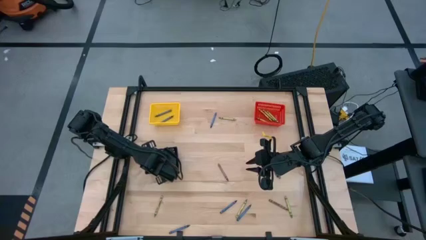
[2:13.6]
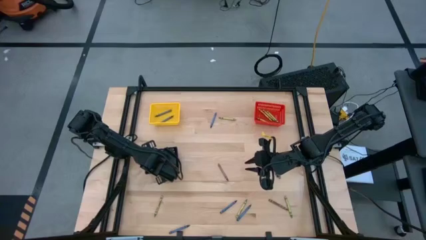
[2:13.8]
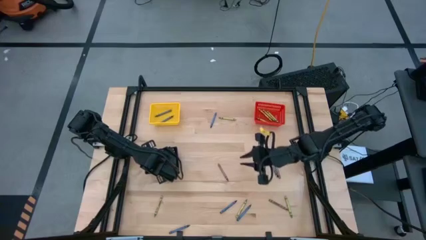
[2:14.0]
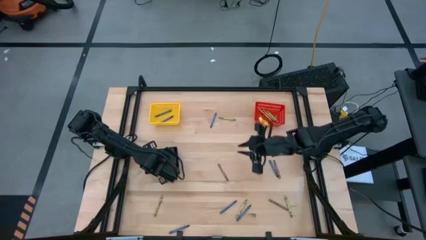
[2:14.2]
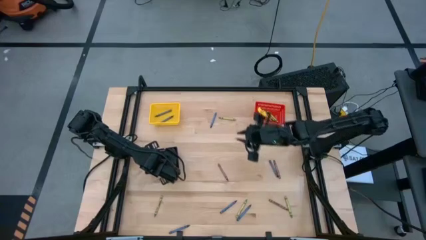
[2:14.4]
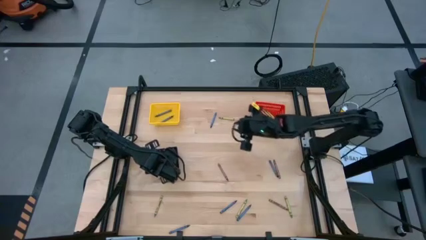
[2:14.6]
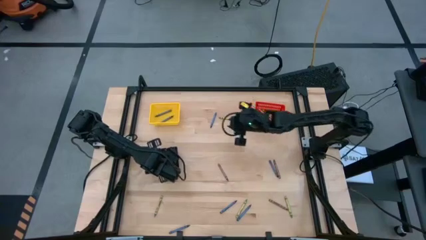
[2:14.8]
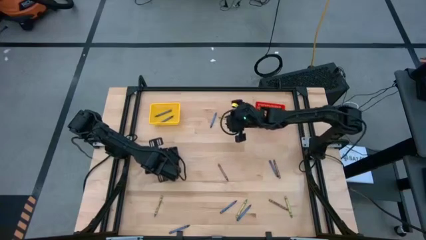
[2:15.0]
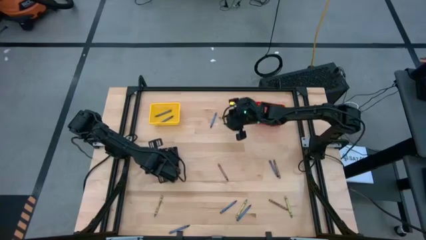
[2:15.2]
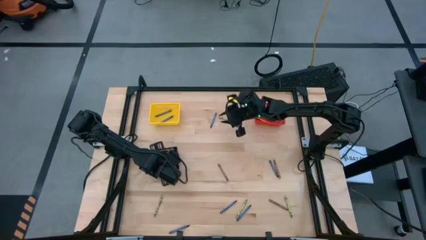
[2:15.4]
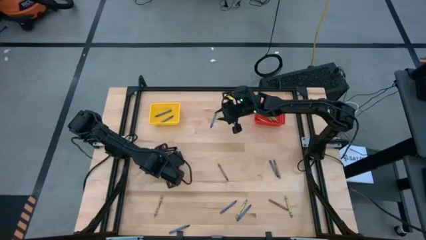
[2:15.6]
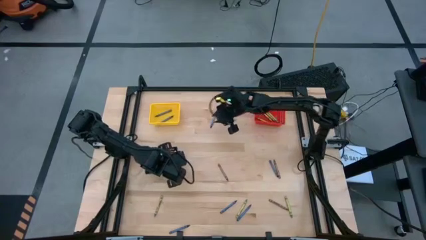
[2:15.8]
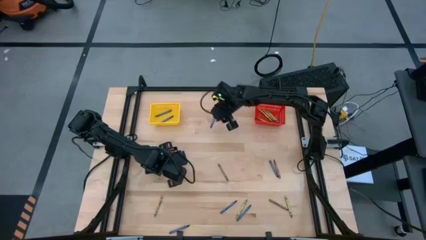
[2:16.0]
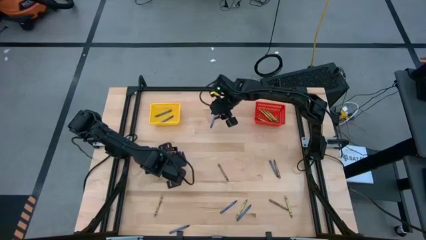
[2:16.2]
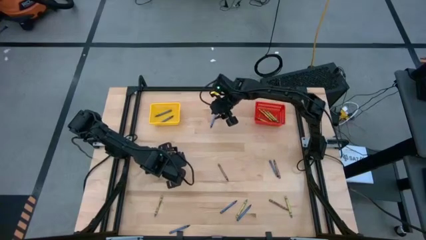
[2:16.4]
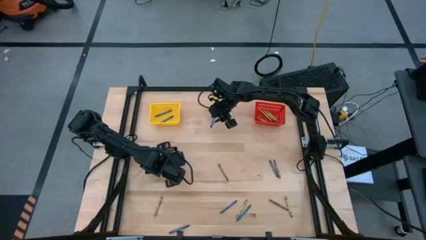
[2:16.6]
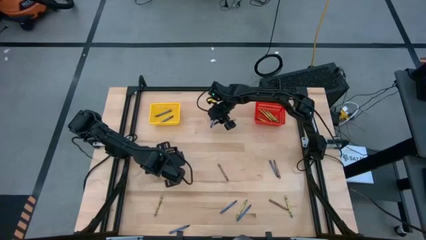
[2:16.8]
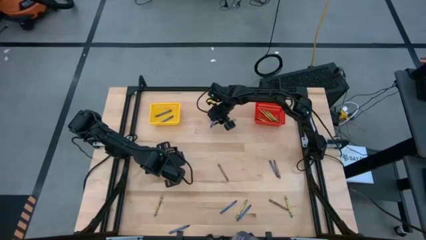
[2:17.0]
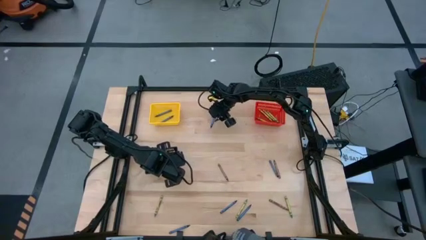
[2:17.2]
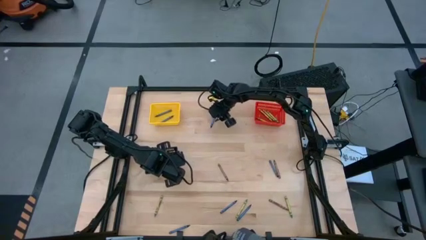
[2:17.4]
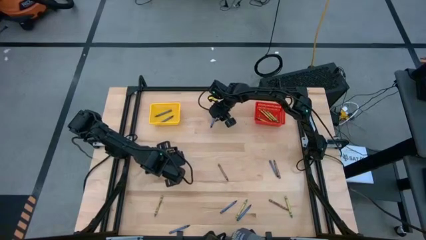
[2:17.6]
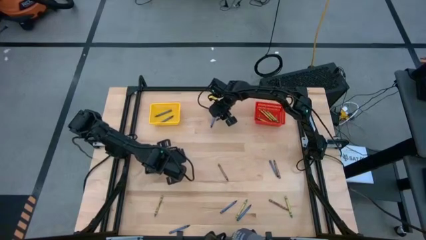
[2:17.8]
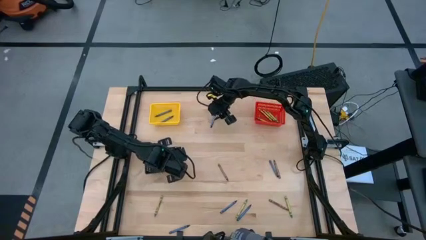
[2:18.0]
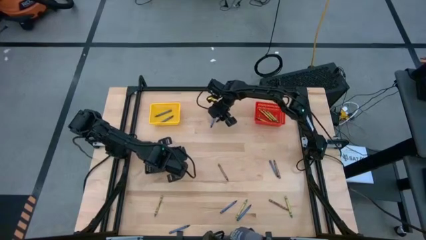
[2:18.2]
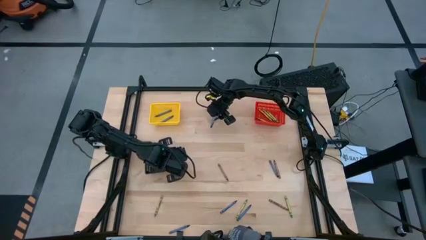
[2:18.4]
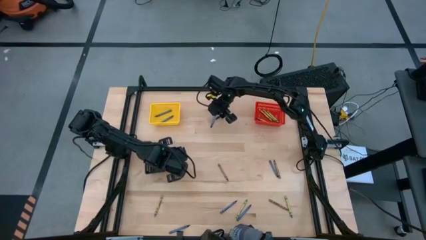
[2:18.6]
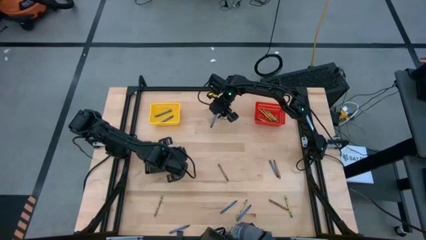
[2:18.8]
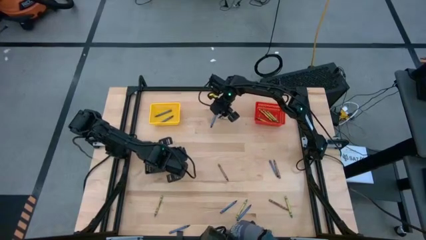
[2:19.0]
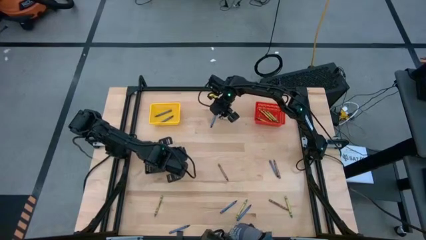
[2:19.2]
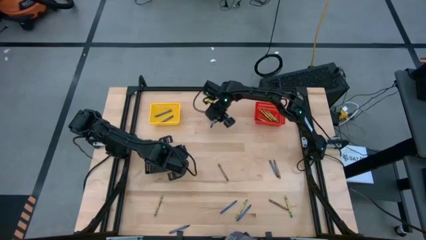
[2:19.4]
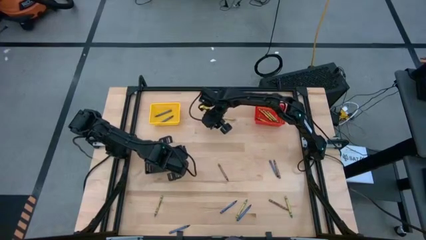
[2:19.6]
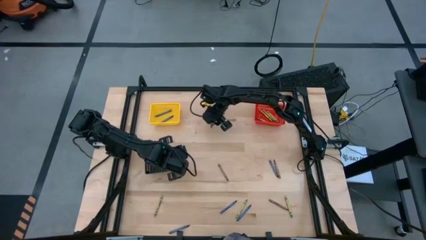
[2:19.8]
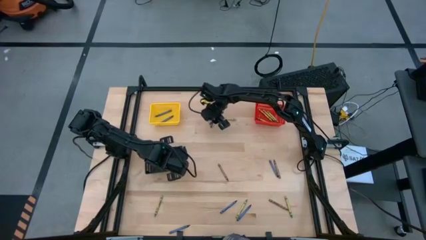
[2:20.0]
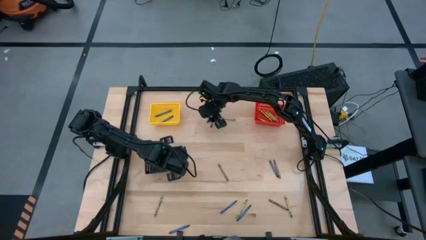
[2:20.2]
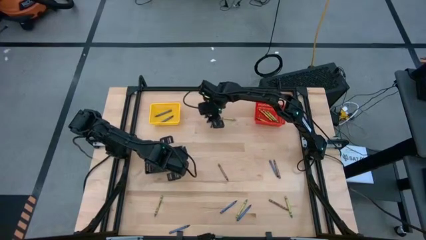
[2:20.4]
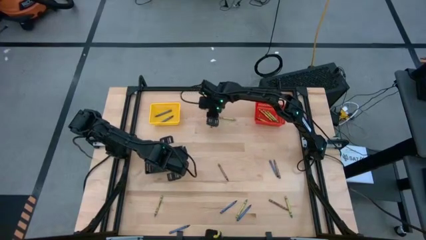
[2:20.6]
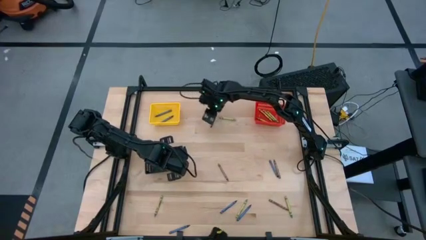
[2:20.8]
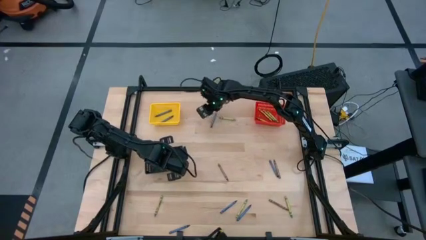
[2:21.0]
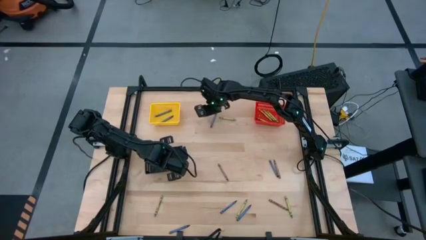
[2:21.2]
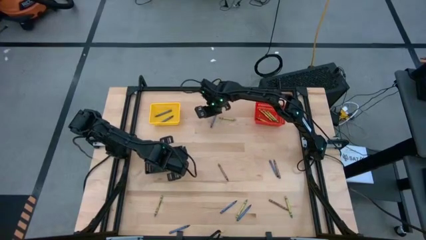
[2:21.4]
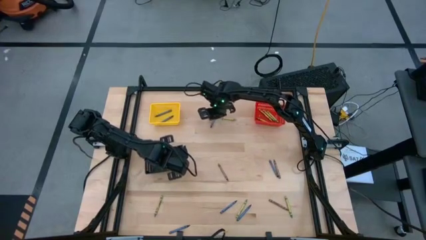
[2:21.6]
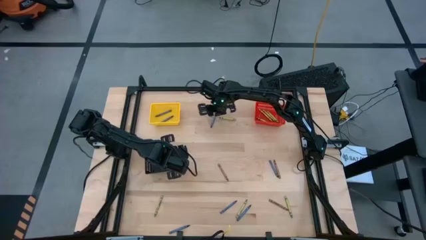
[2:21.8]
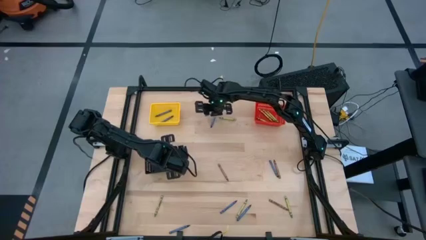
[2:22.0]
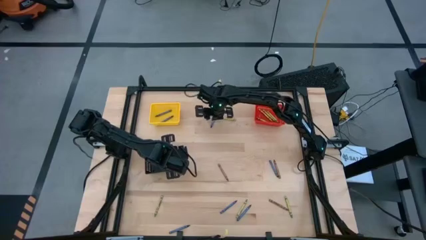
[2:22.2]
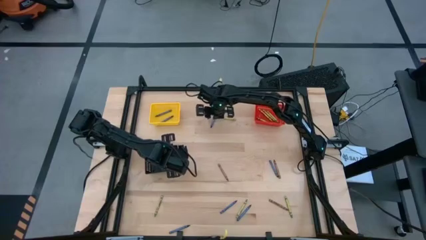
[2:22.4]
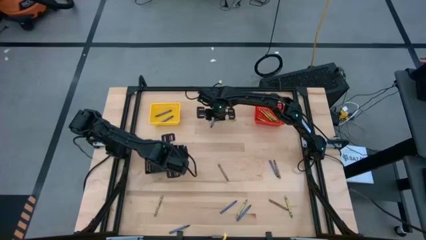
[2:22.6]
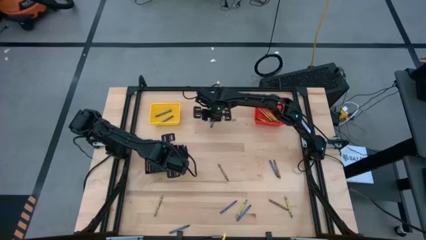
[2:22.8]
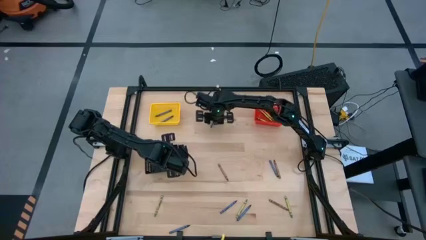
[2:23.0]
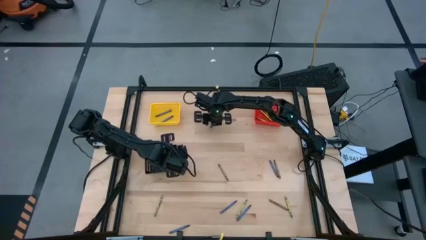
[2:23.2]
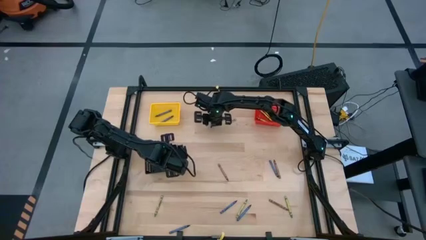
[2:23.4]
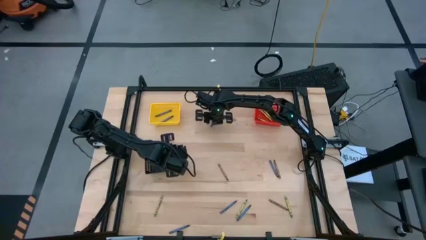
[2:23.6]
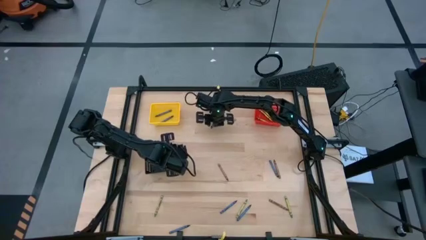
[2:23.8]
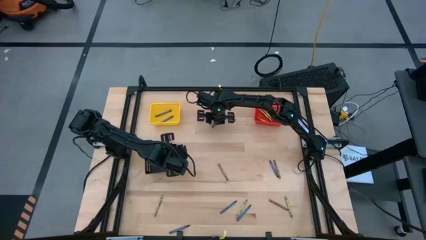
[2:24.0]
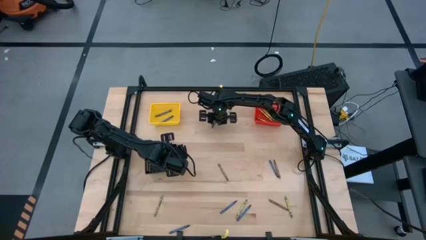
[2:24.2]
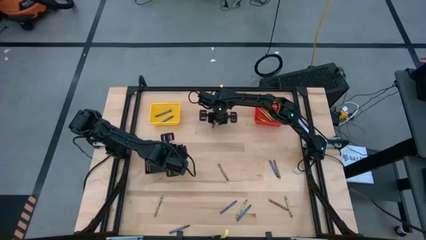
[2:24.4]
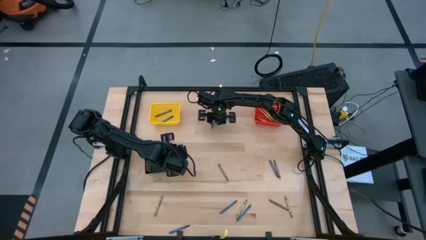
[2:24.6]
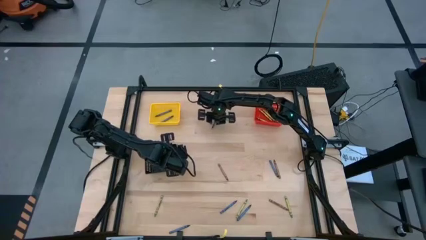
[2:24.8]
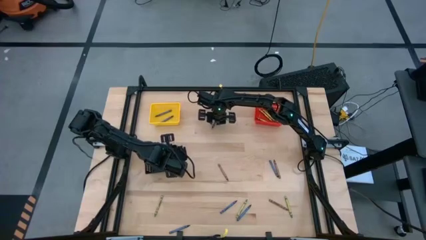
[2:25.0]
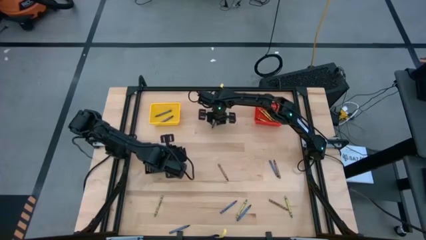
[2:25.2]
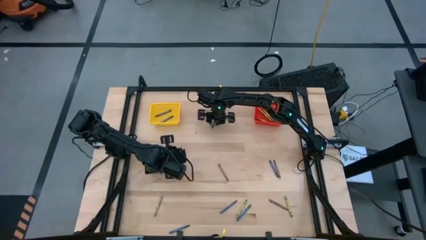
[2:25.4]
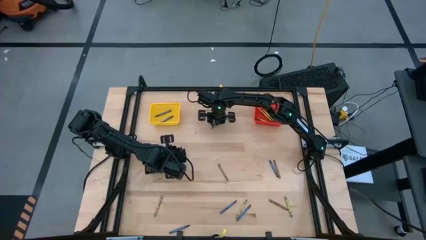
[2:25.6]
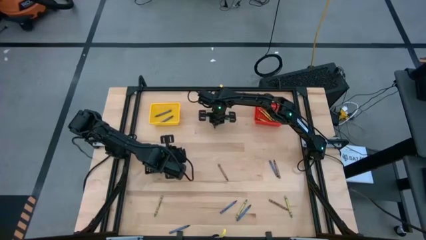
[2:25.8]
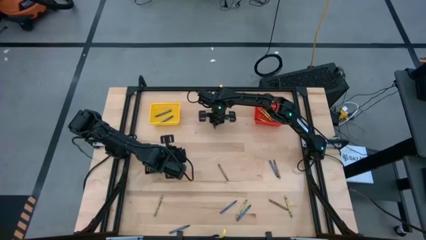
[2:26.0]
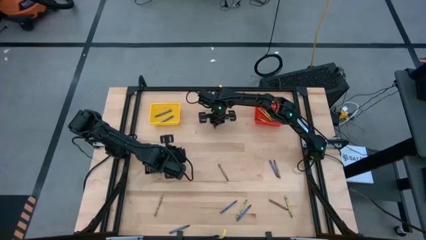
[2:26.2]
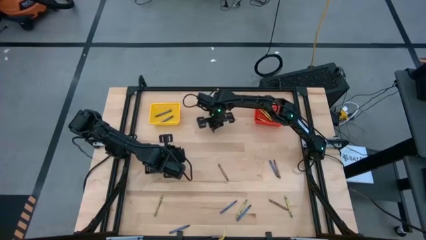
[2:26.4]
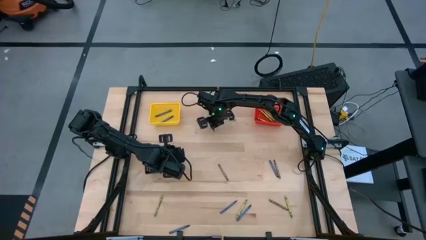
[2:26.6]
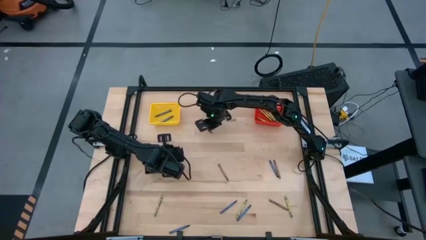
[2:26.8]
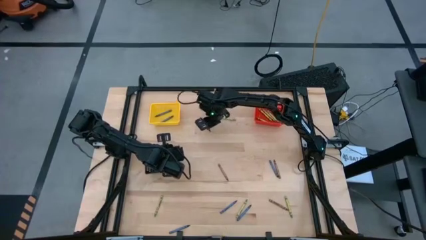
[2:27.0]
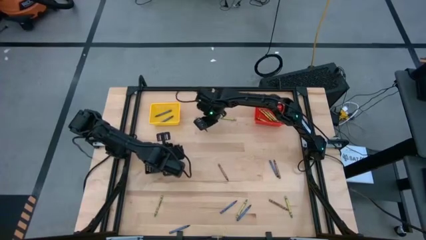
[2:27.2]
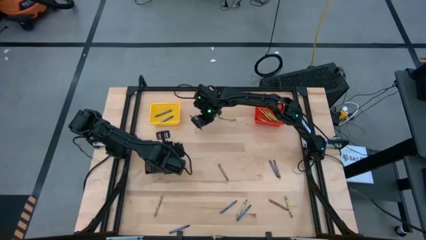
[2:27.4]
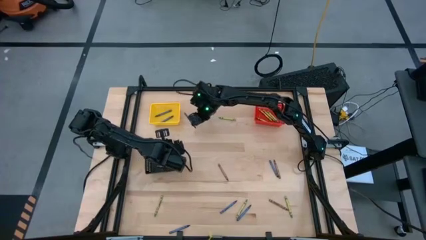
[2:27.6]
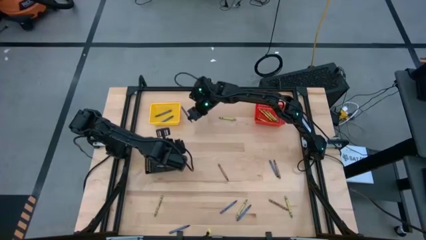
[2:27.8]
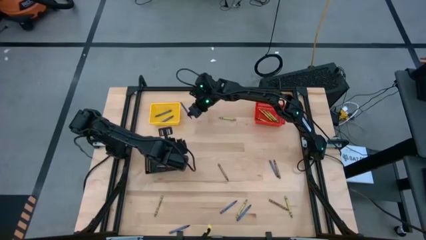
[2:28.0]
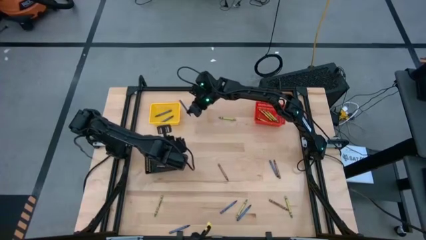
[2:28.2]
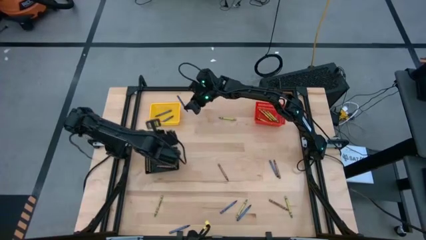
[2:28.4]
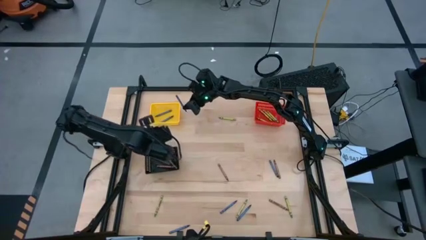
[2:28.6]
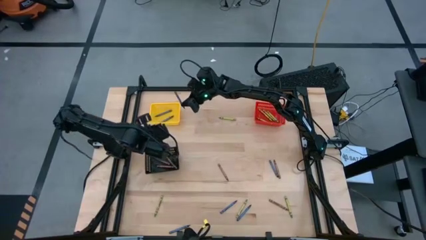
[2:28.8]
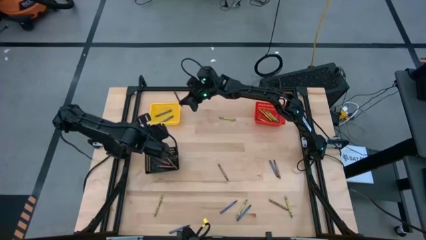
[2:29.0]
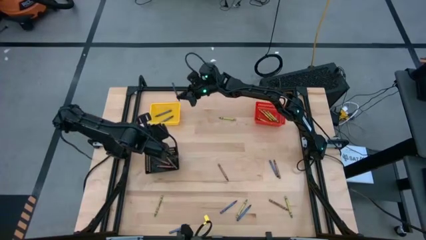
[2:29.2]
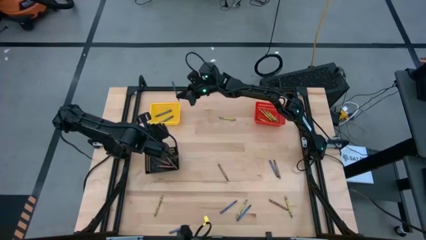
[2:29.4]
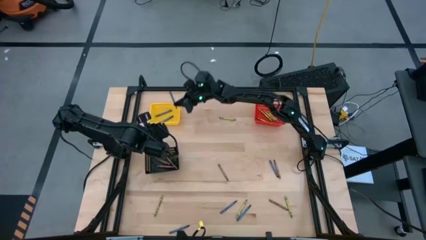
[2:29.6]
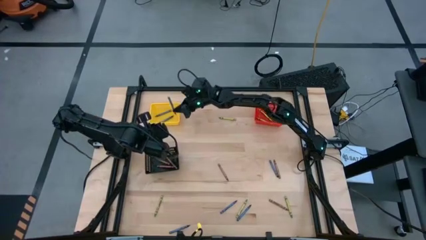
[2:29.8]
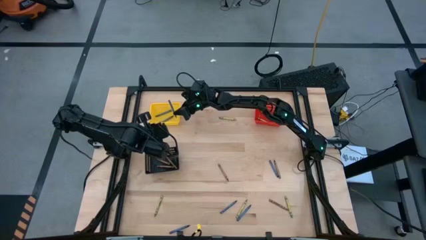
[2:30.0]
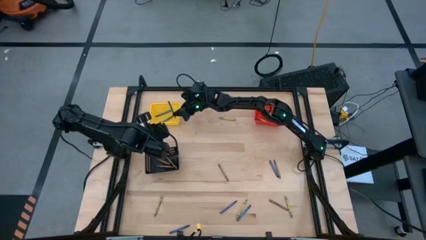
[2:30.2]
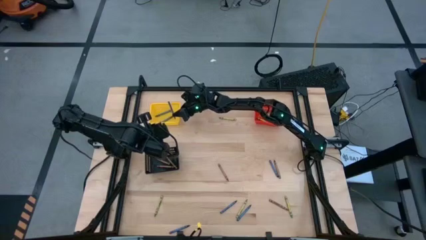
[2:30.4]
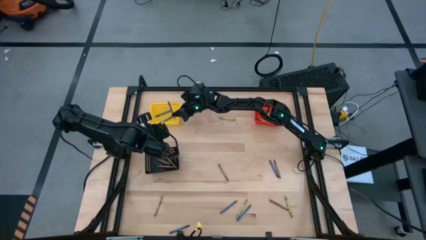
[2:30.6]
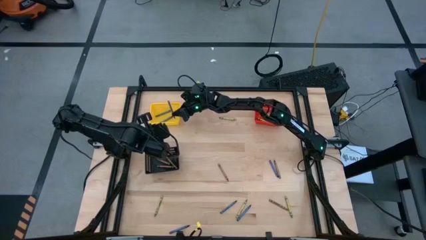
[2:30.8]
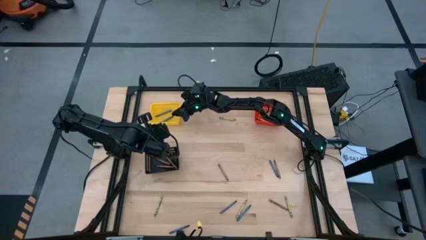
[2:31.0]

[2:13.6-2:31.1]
Task: Sort crayons
Put the blue crayon into the yellow bin
